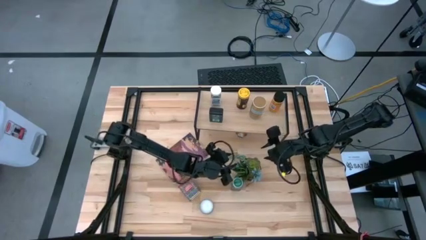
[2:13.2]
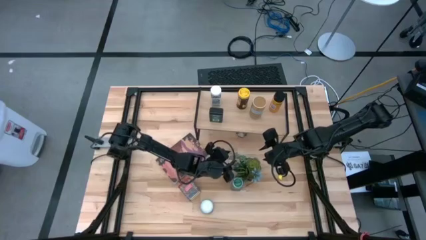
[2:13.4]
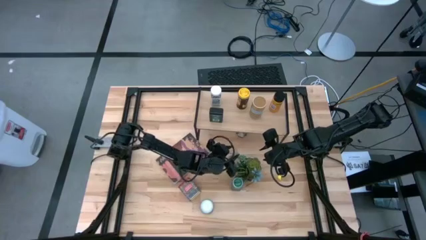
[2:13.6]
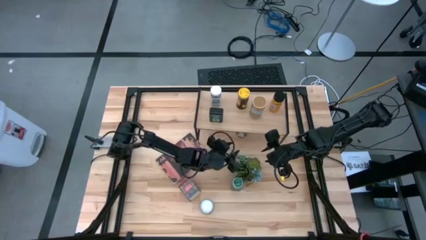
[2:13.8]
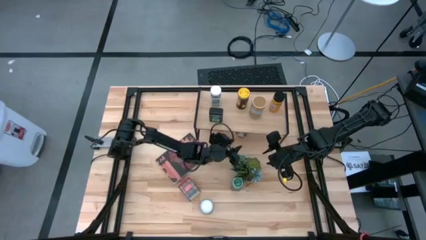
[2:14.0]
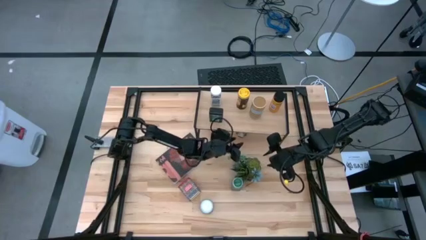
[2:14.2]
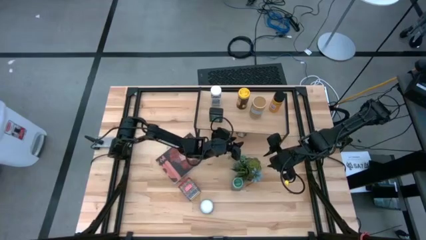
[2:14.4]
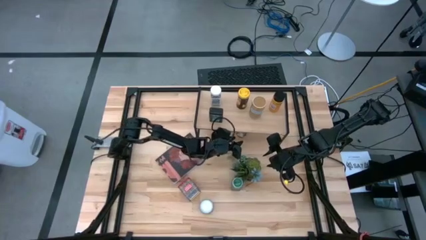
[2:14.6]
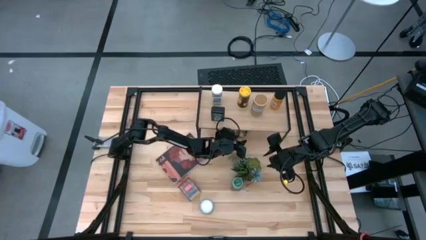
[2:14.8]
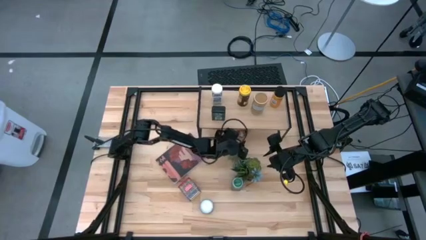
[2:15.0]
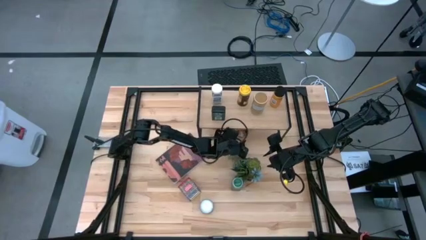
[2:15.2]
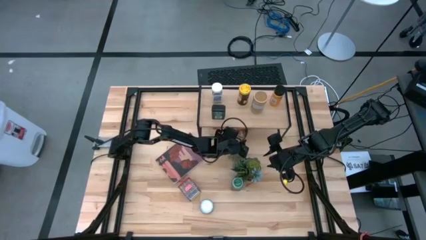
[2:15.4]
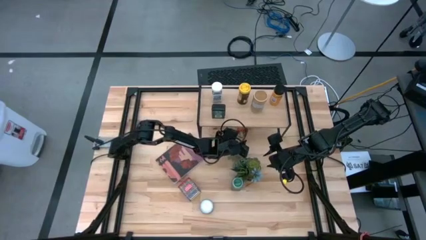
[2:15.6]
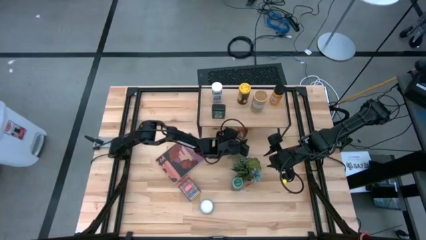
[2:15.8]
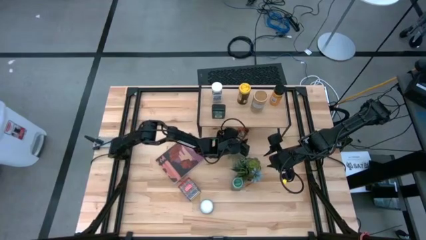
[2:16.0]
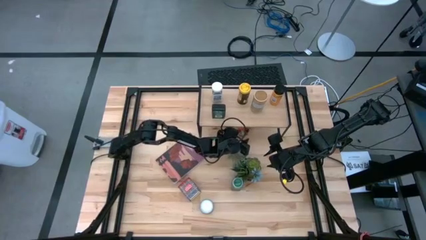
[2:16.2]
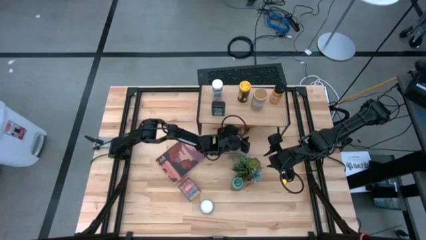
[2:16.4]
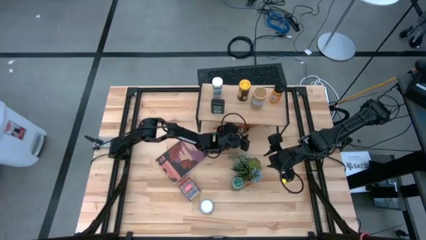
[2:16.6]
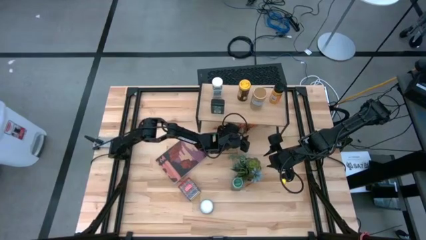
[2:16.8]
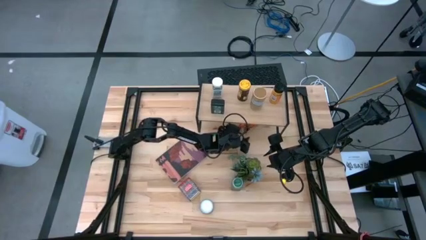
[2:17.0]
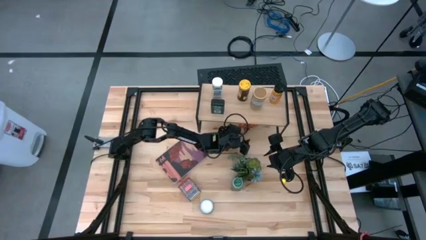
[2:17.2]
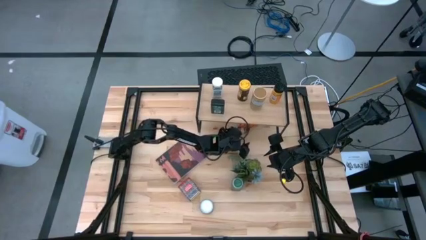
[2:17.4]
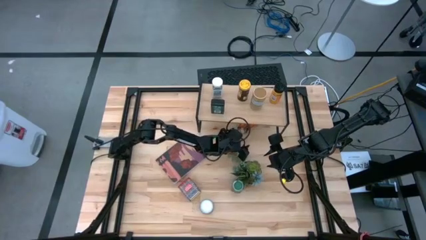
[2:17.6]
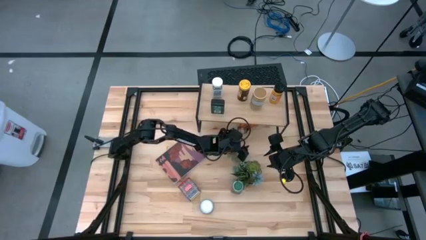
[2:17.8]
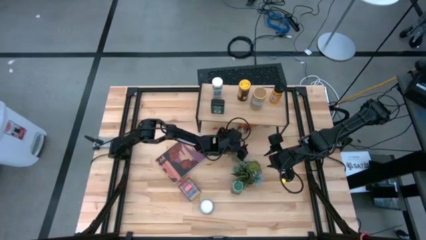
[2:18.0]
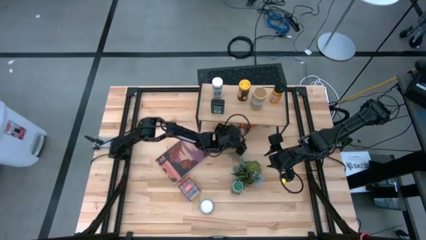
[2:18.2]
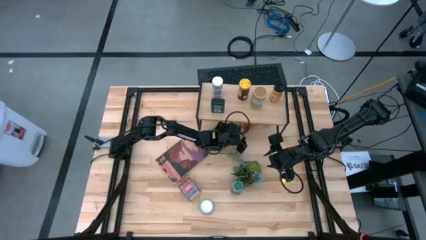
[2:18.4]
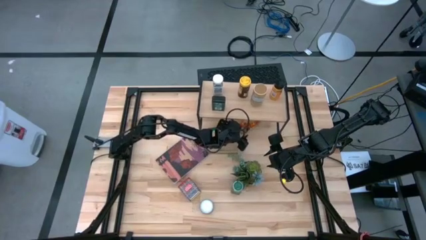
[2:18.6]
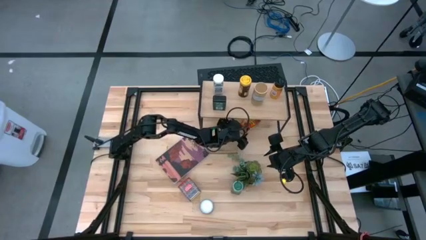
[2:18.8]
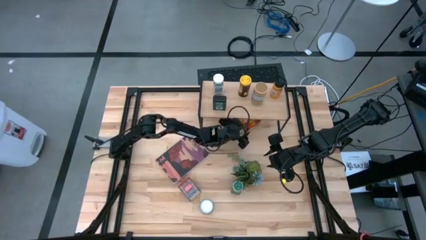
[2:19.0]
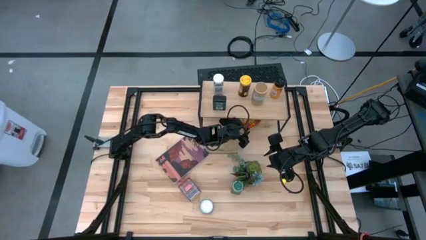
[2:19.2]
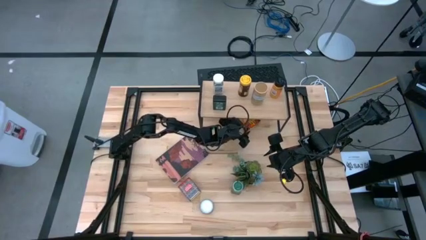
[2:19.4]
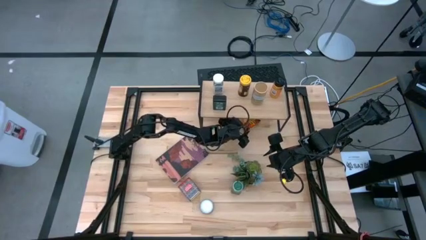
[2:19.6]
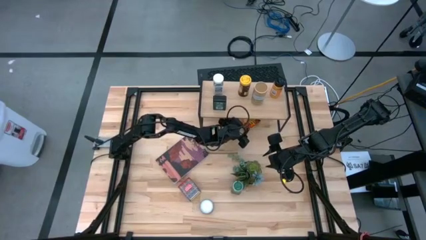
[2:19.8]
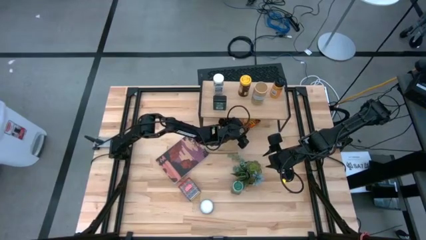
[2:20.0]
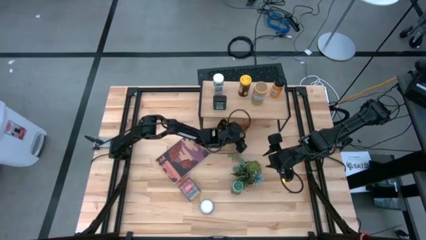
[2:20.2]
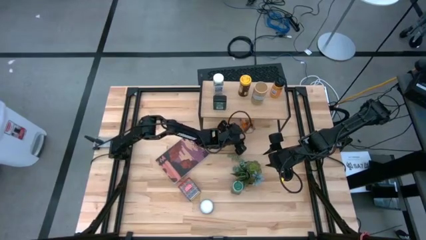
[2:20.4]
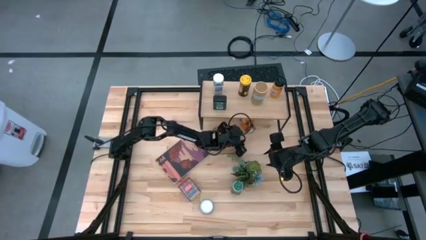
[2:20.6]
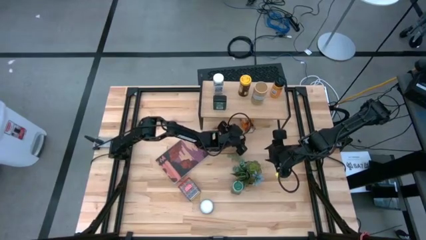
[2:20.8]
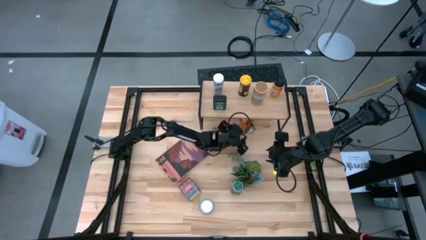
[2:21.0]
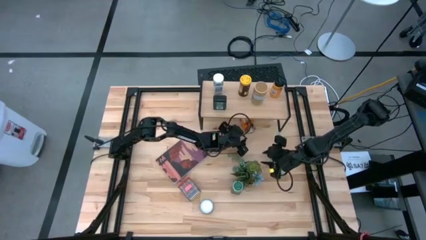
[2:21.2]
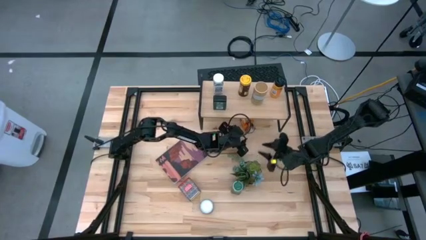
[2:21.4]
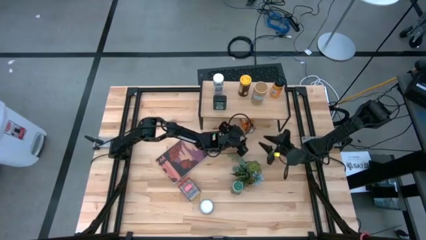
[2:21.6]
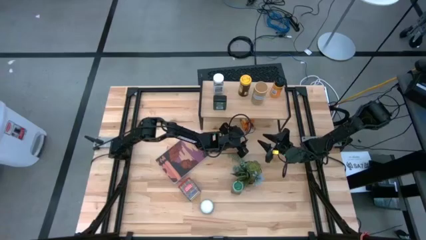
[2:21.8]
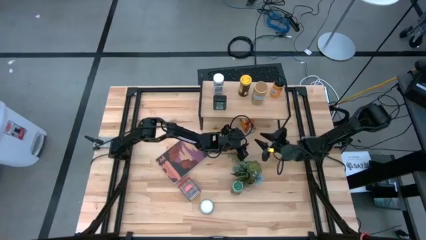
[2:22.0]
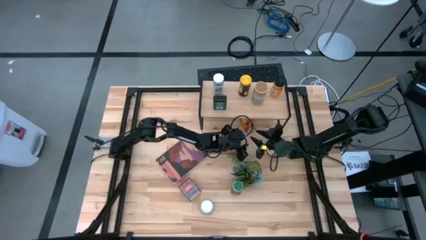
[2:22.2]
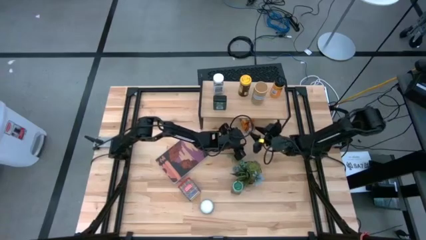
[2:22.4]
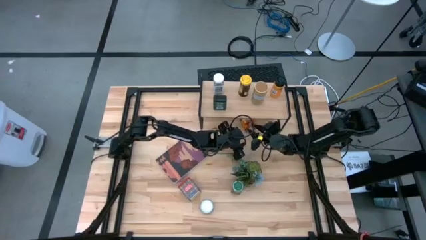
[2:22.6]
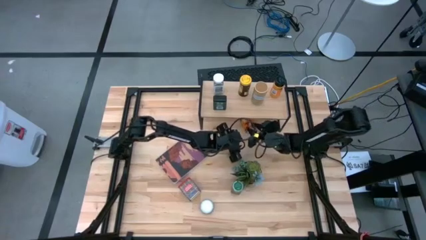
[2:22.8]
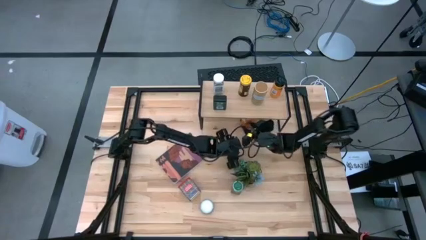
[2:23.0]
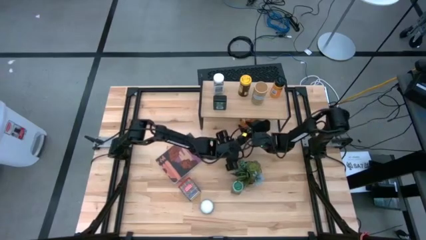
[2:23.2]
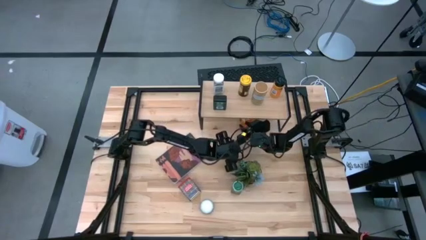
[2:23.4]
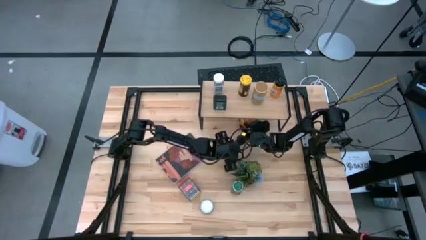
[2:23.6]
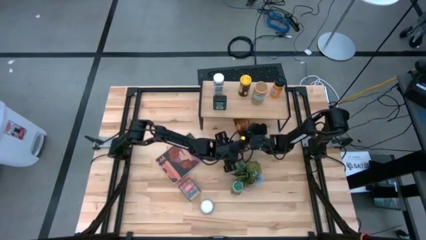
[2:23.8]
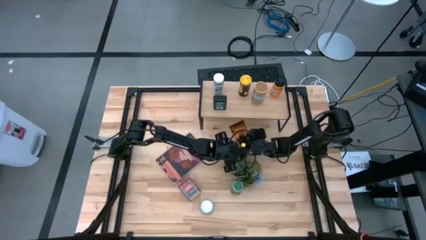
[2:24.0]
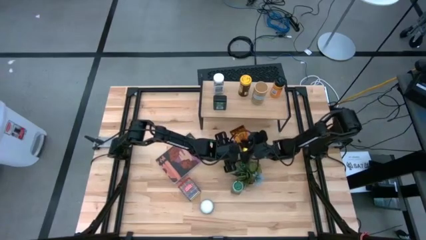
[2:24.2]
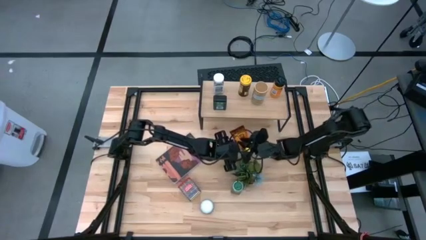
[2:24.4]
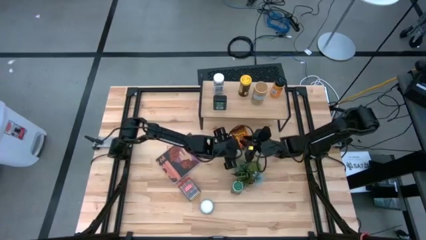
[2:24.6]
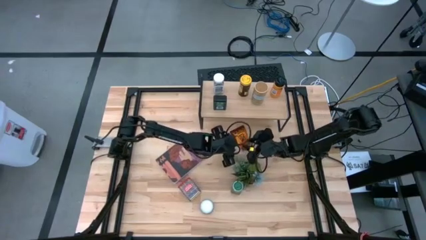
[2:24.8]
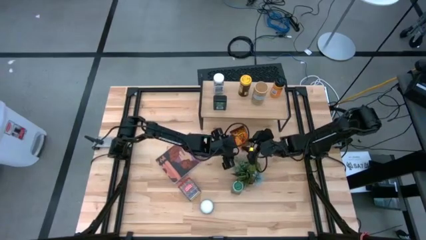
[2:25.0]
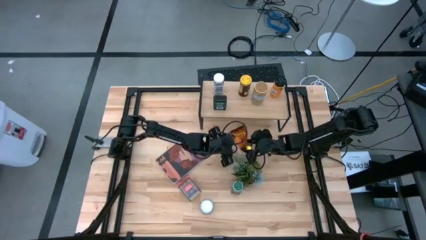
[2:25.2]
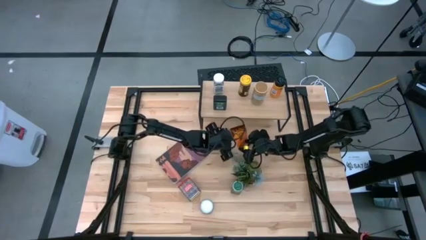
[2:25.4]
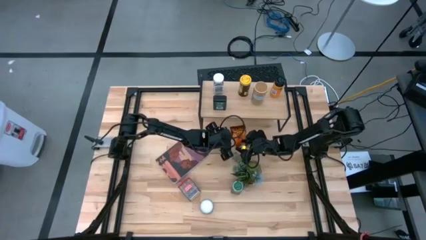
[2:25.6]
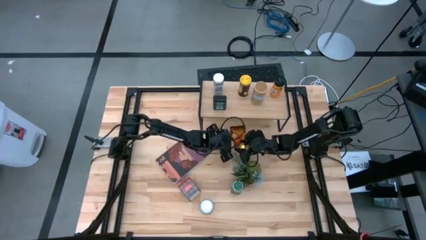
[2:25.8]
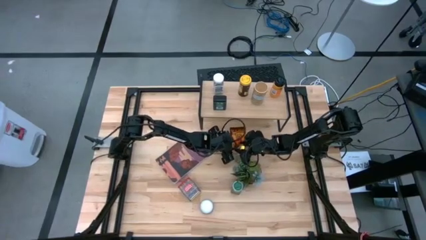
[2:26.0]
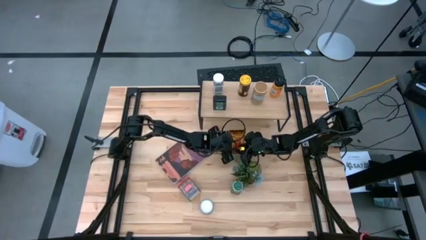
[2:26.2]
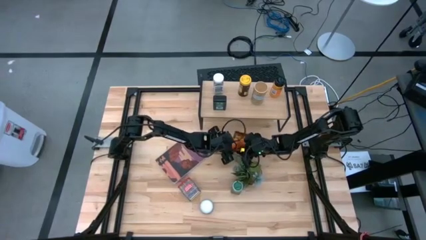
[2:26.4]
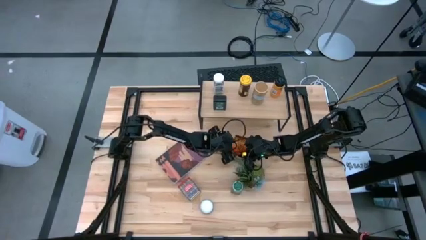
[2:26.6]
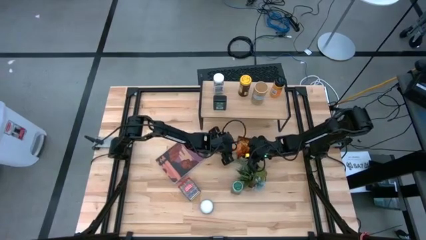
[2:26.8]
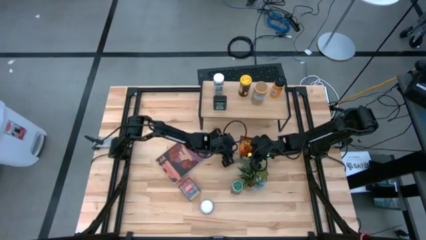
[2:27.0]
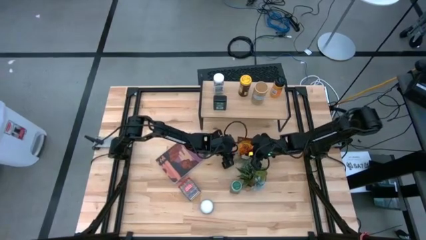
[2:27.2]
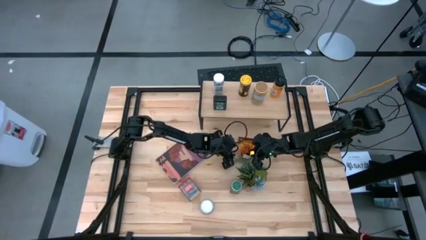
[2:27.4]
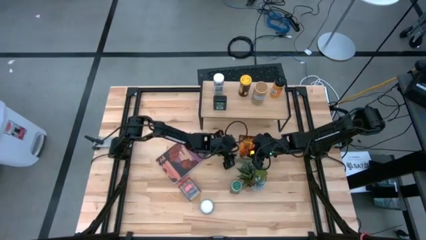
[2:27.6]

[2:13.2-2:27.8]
Task: Shelf spices
Put the orange seasoning bag on the shelf

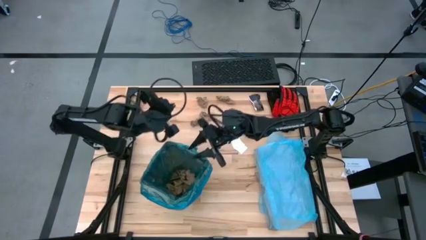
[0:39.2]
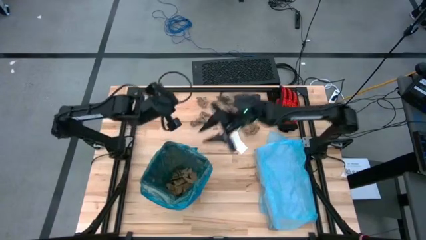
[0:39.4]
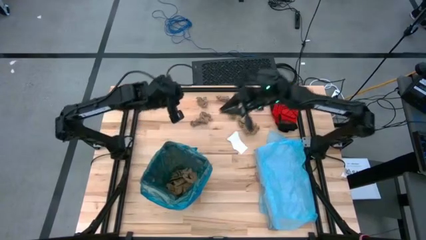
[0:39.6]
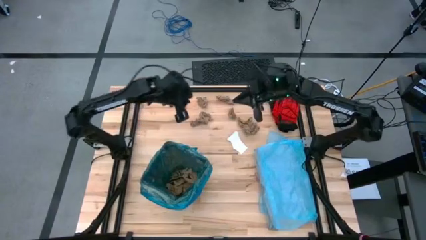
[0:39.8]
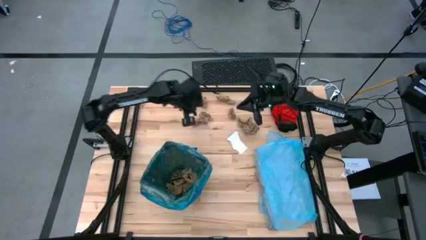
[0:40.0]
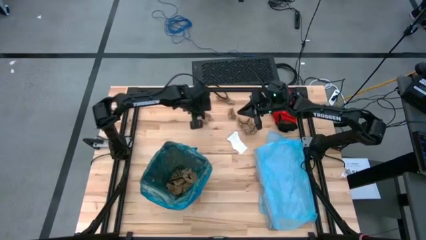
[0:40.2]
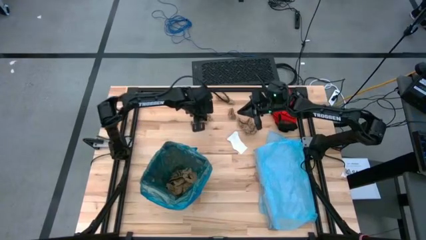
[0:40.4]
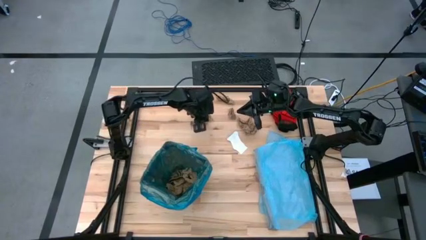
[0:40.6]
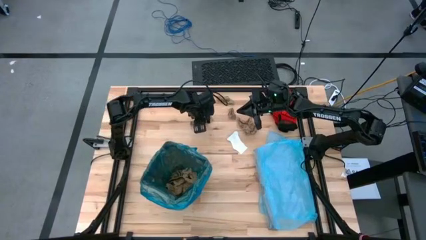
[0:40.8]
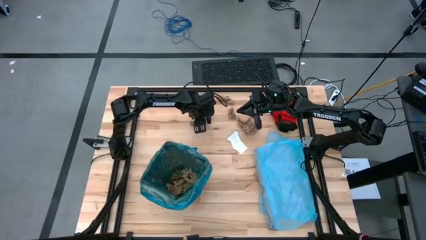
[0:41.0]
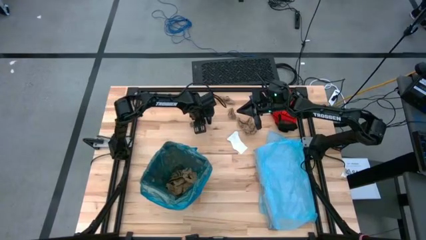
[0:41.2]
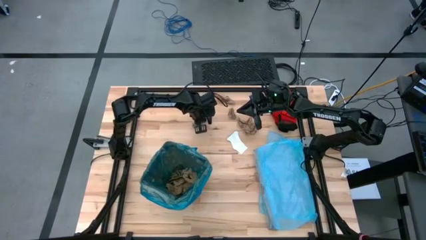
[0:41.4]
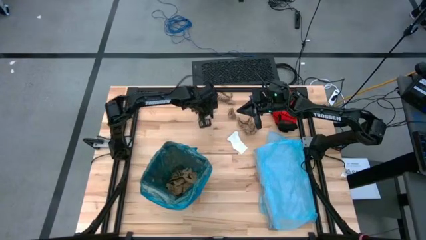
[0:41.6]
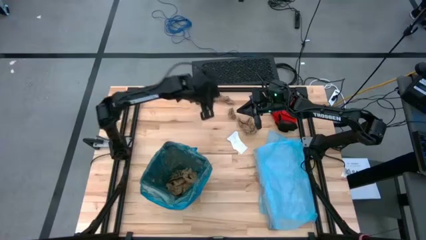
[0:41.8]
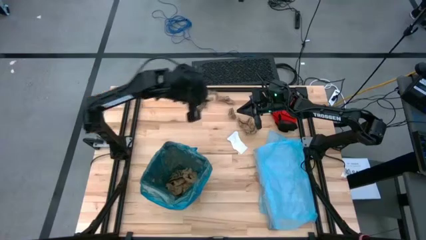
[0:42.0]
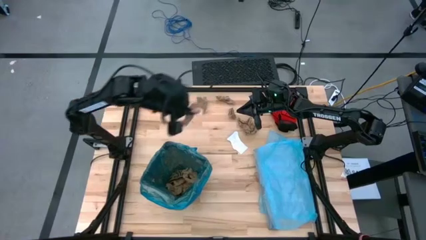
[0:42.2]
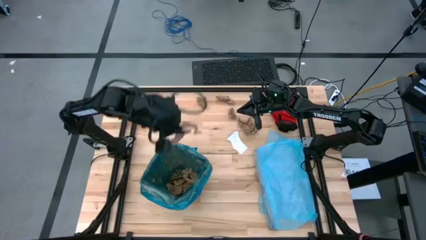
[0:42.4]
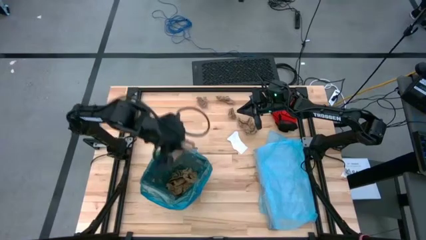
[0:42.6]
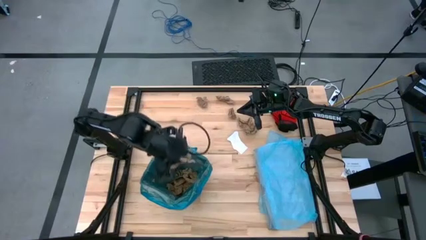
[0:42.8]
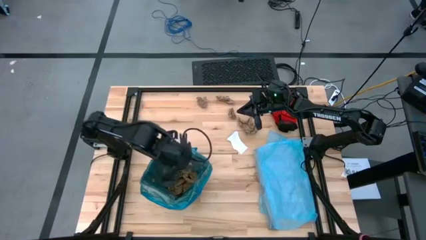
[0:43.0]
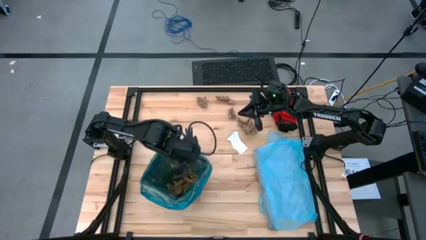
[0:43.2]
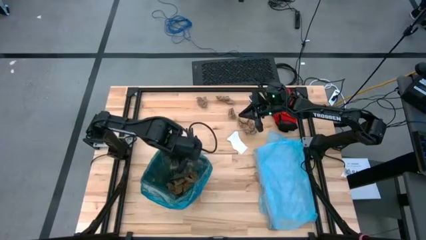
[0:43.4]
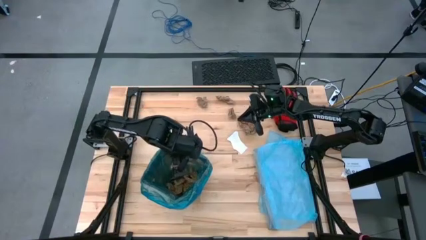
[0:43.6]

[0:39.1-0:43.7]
Task: place trash/remove bag and relplace
Put the brown napkin into the trash bin
